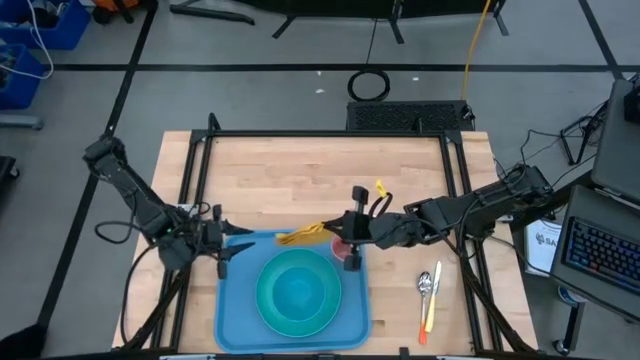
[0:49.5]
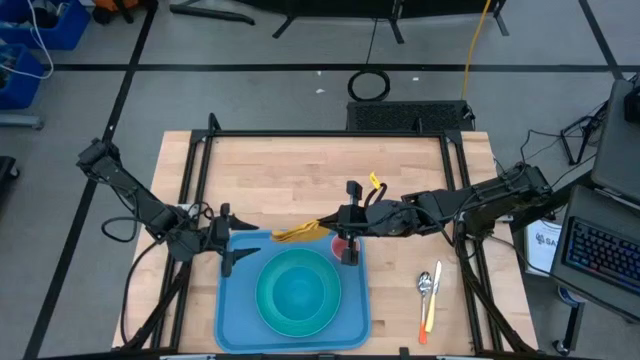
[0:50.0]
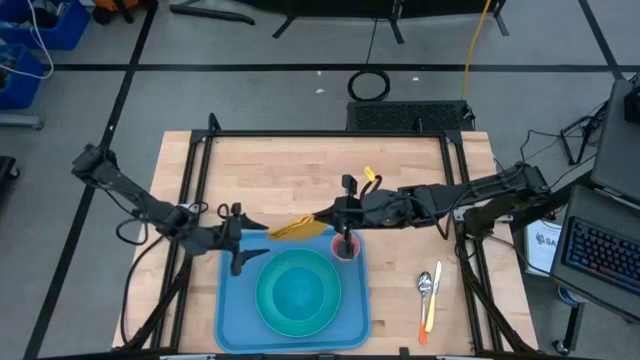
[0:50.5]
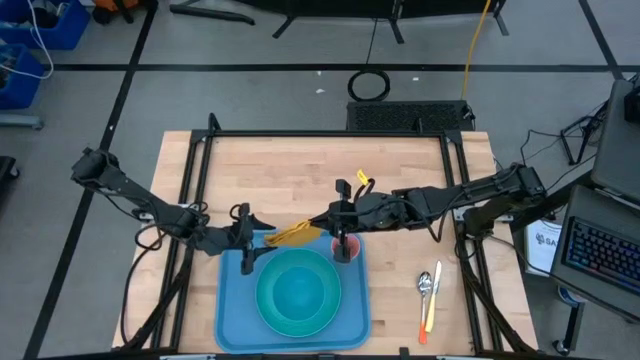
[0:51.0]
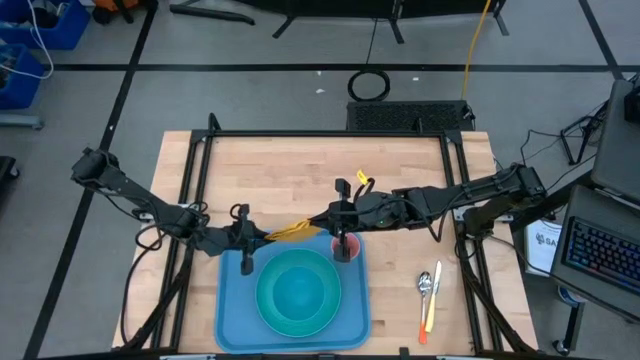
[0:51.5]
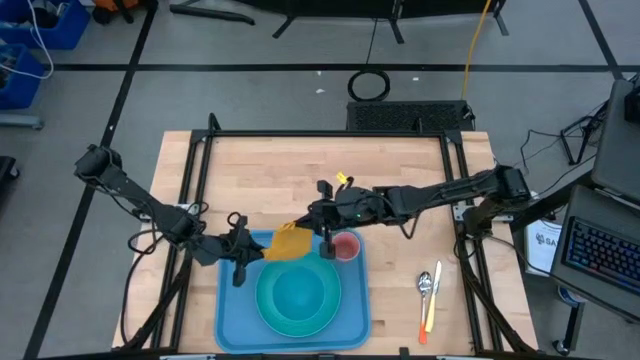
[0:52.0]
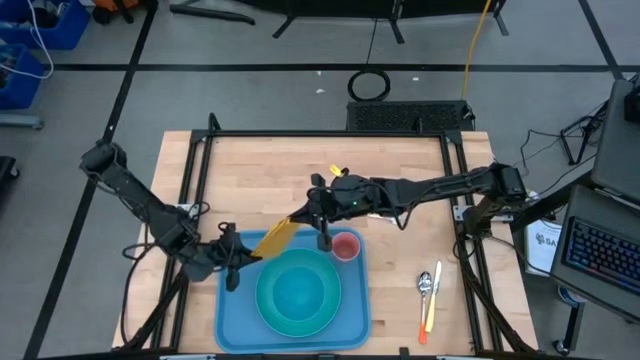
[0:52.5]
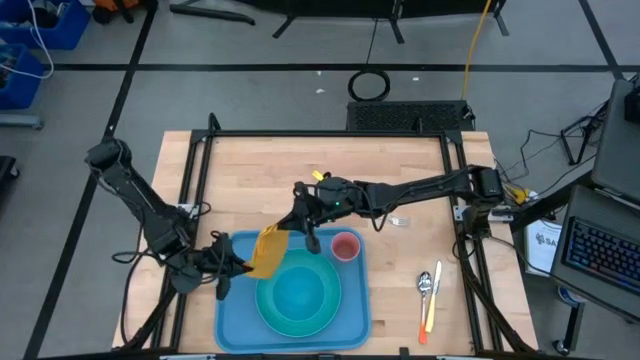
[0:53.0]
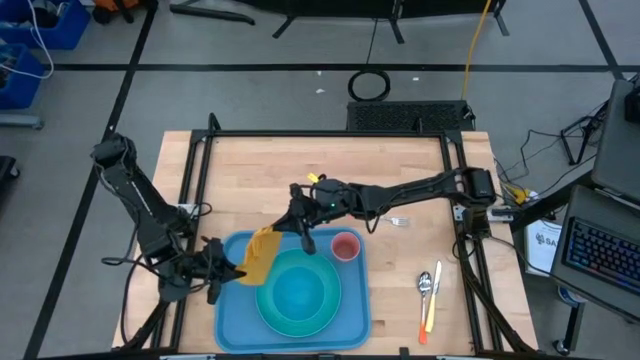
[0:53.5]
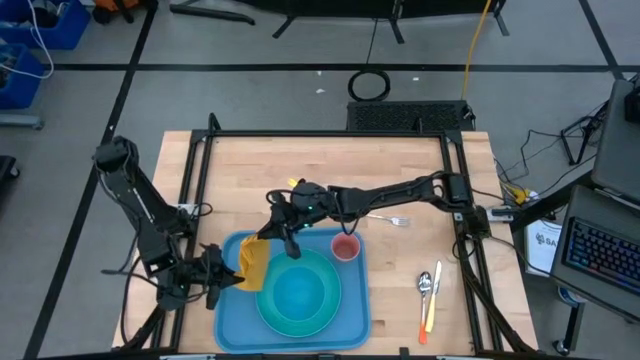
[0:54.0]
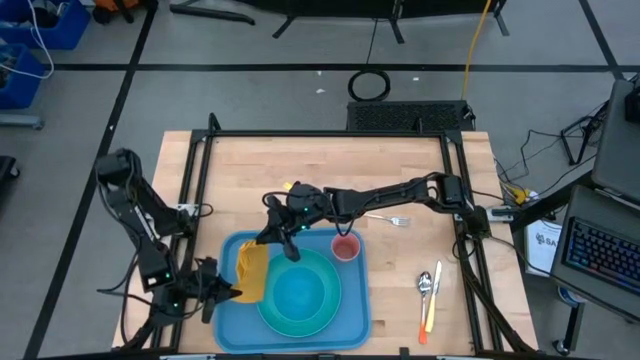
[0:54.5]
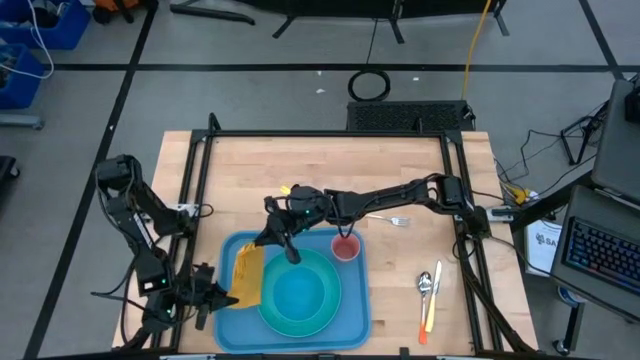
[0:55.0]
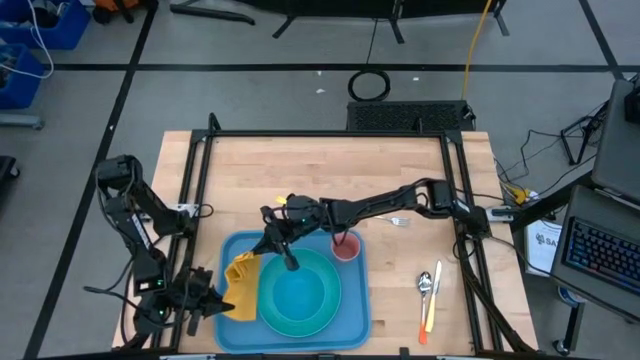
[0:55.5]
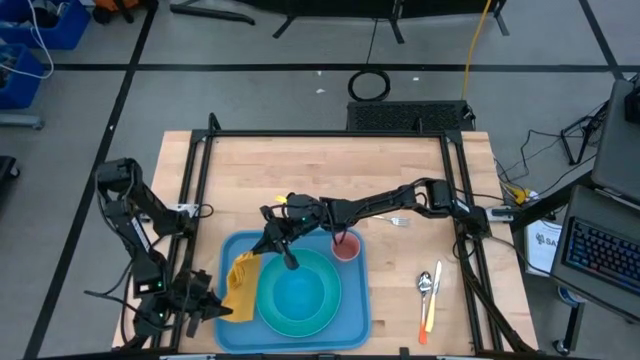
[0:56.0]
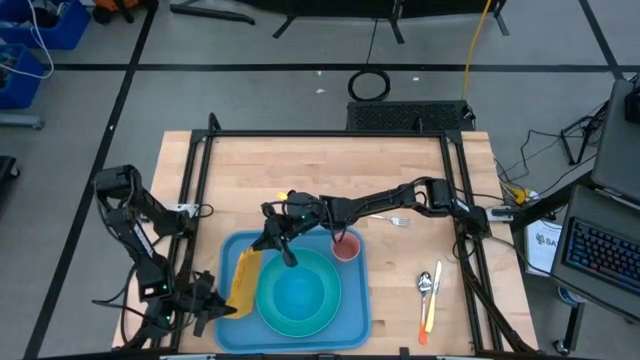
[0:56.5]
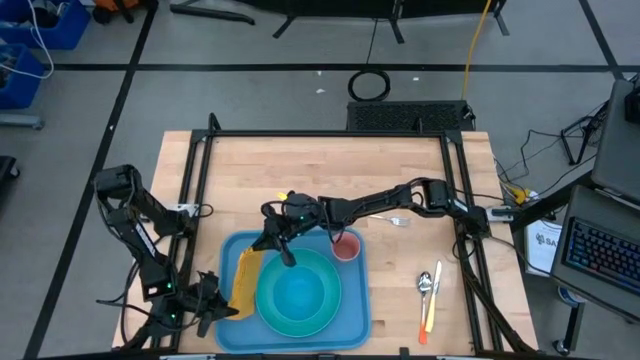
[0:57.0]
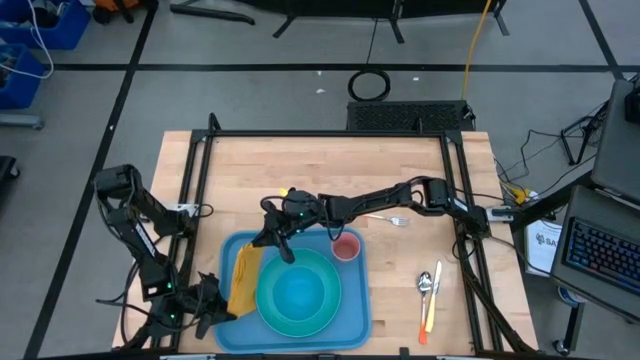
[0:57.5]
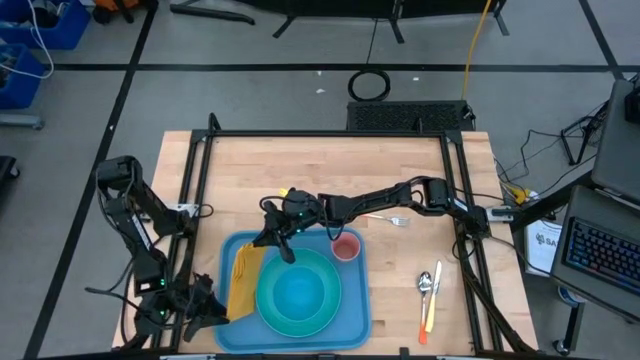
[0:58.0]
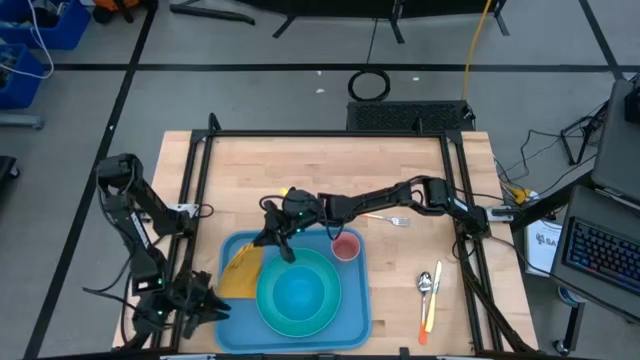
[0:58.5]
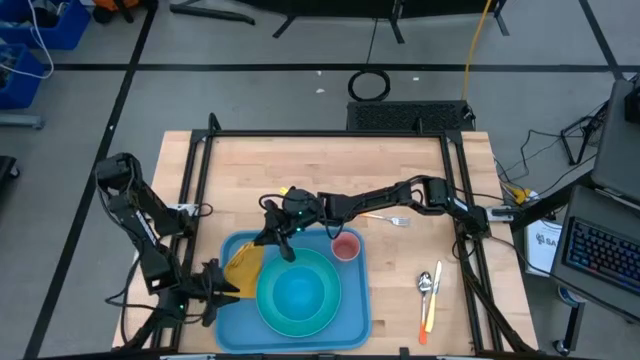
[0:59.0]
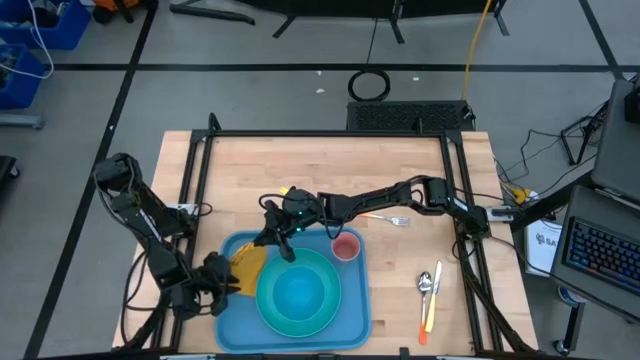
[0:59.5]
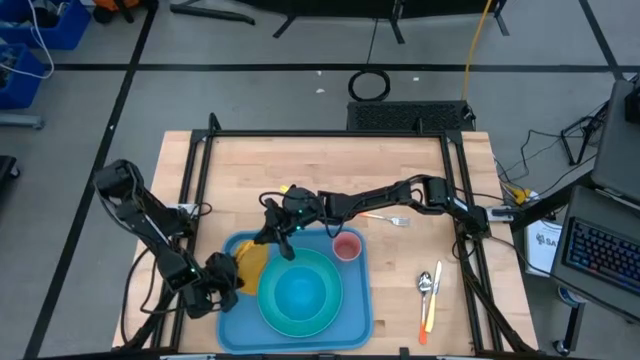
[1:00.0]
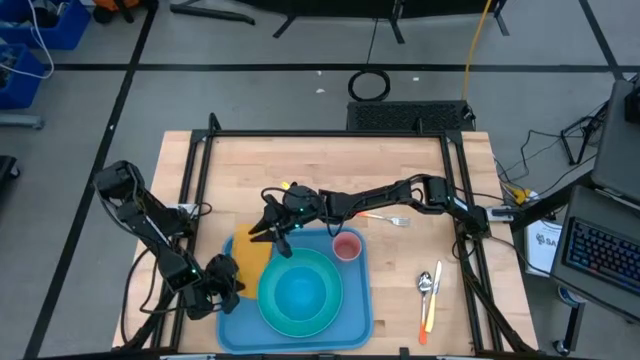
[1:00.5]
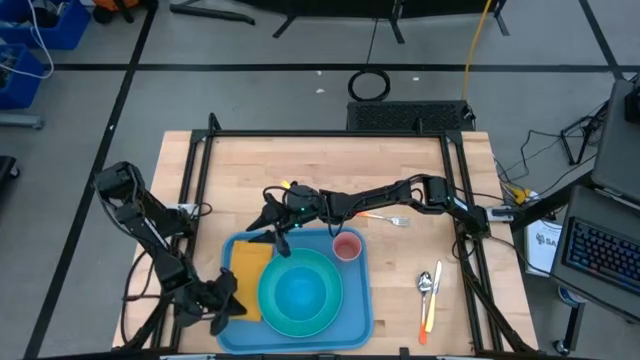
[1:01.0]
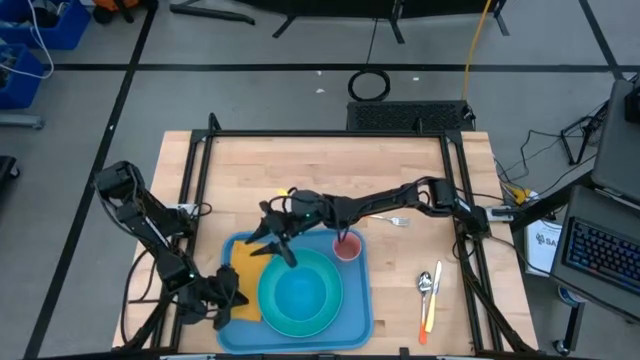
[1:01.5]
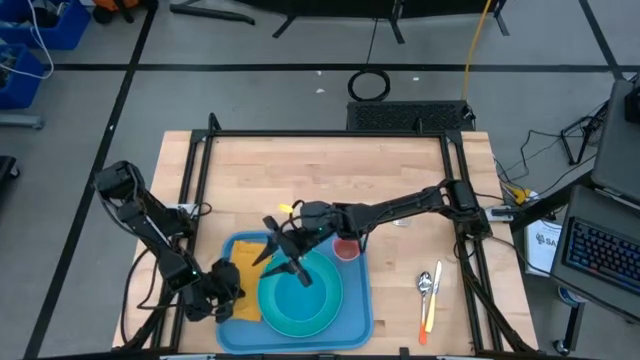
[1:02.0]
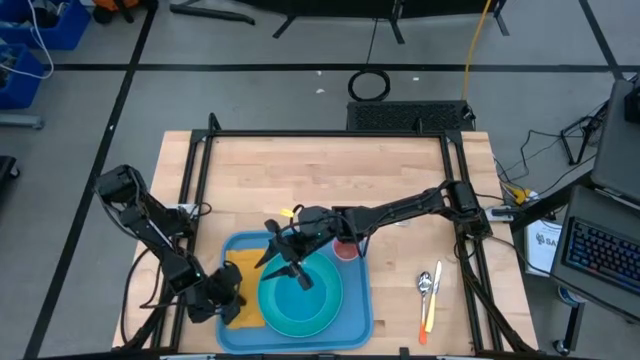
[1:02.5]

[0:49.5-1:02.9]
Task: Set up tray
Put the yellow table napkin on the serving tray to the left of the light blue plate

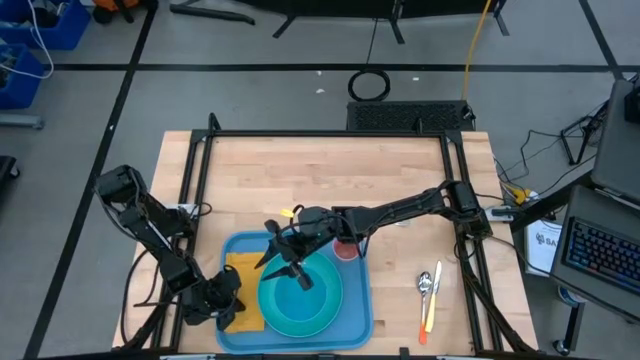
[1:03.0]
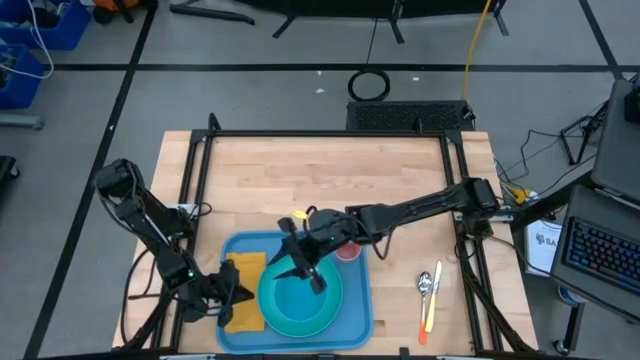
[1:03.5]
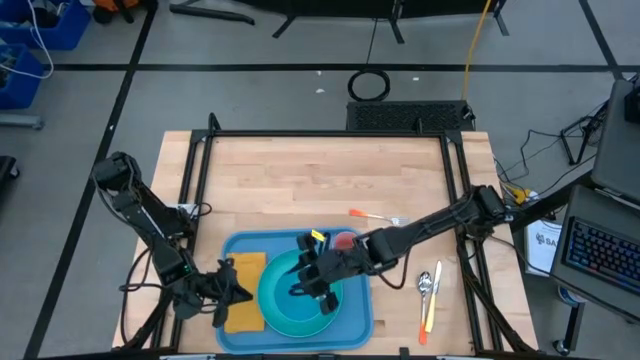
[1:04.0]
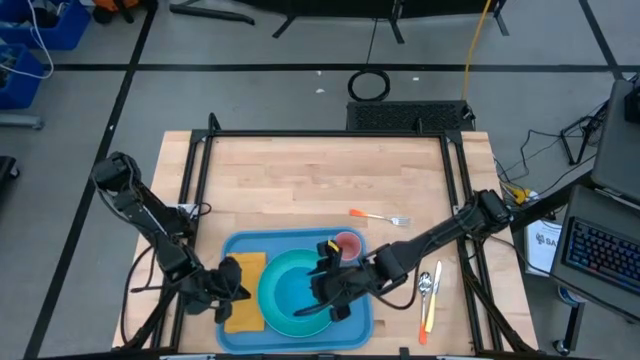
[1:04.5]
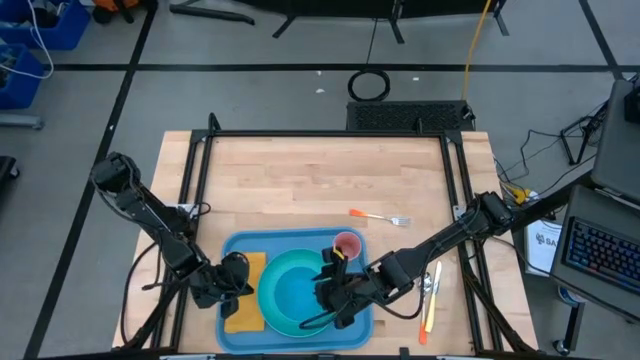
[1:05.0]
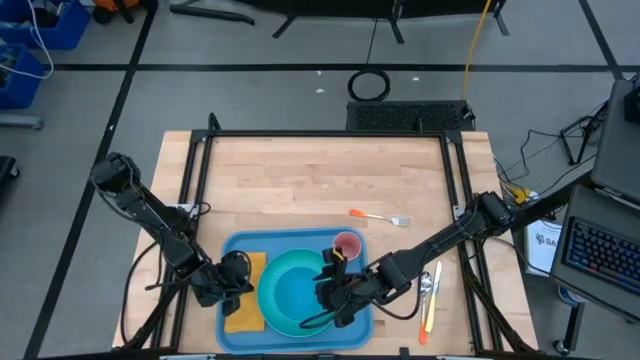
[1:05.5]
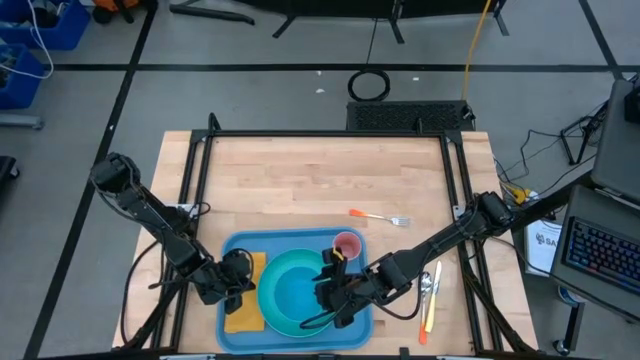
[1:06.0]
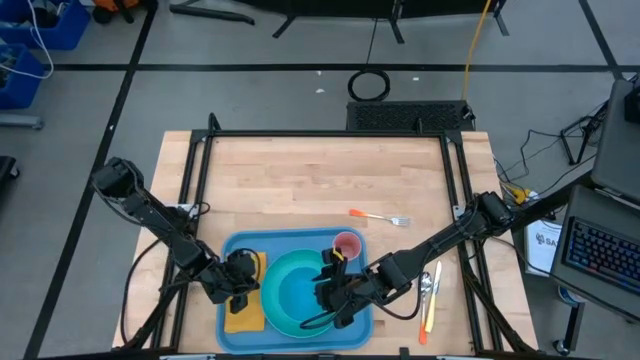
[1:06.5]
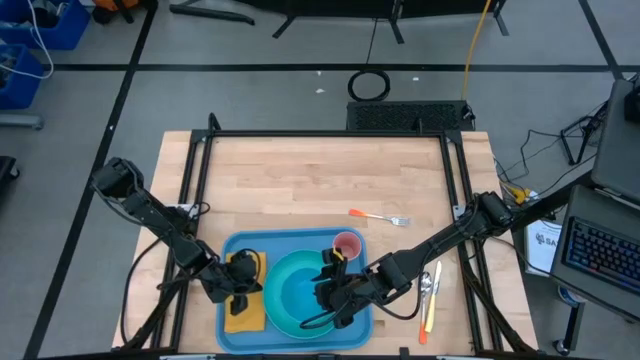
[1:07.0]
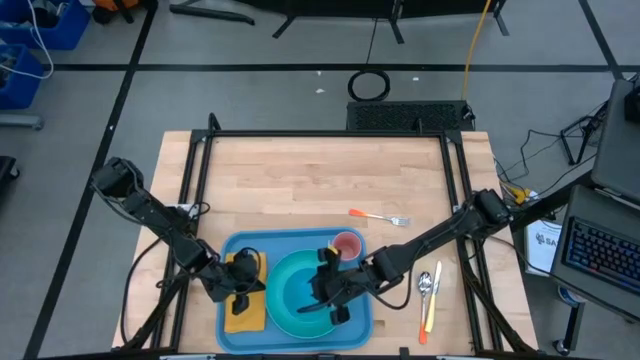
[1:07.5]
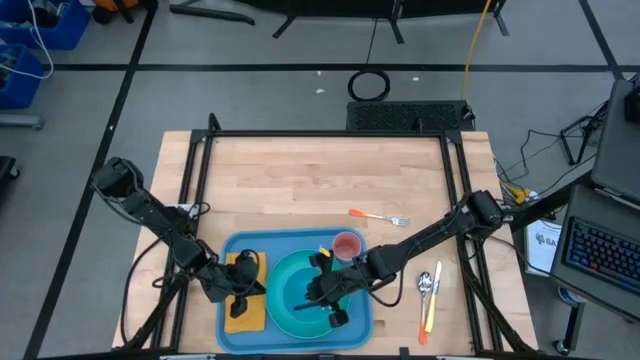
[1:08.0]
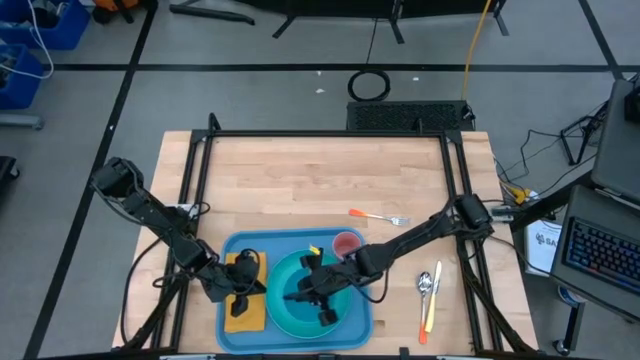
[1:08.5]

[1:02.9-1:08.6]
Adjust the light blue plate on the serving tray

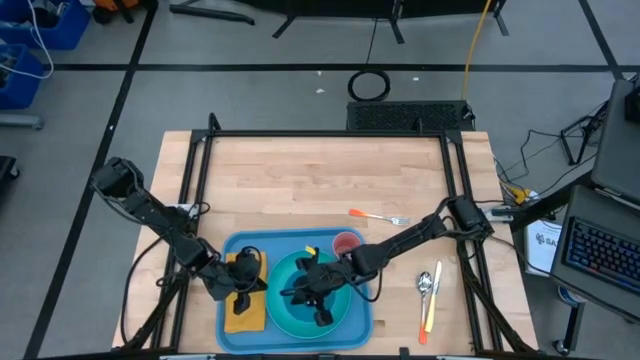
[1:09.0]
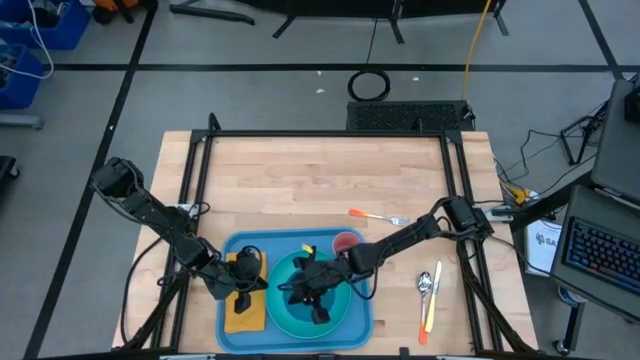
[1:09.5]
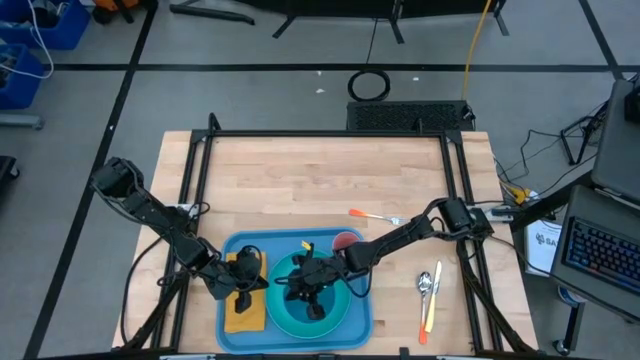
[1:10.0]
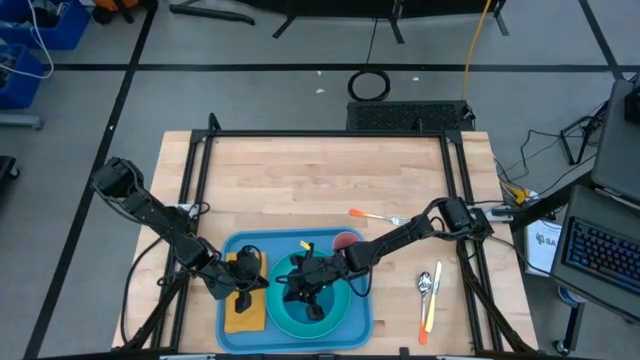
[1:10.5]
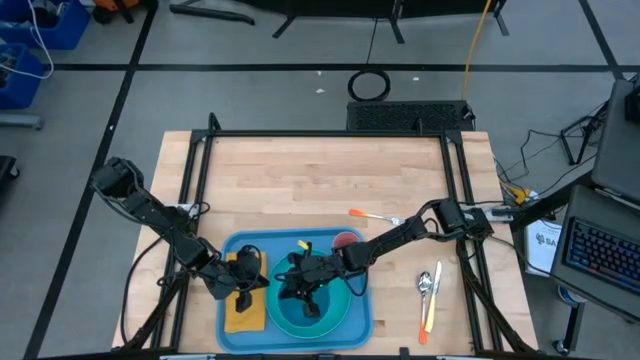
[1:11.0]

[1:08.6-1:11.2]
Adjust the blue bowl on the serving tray
